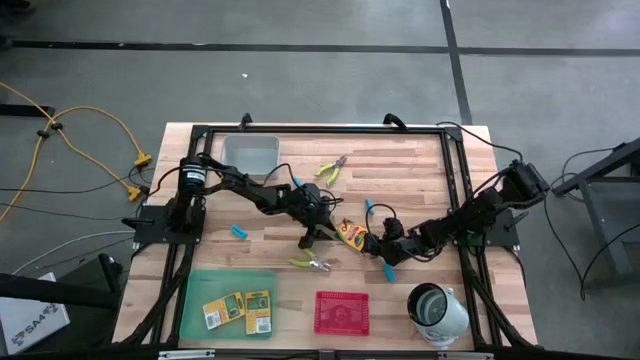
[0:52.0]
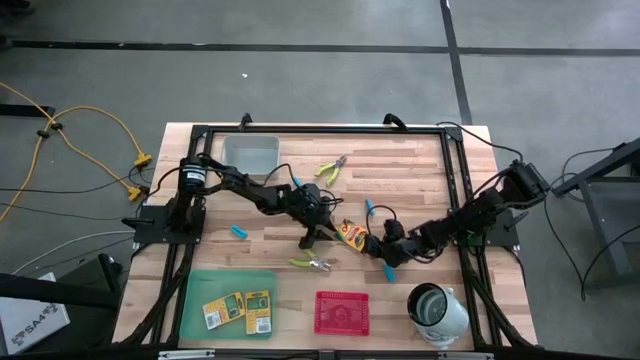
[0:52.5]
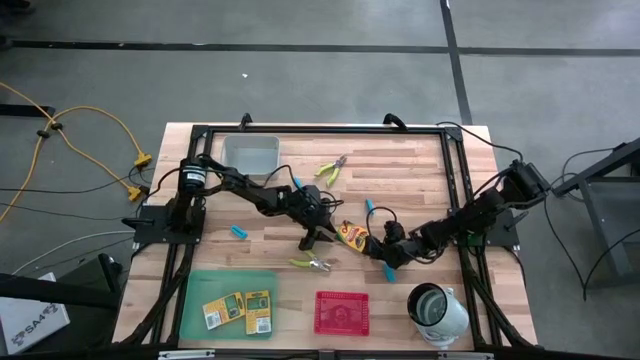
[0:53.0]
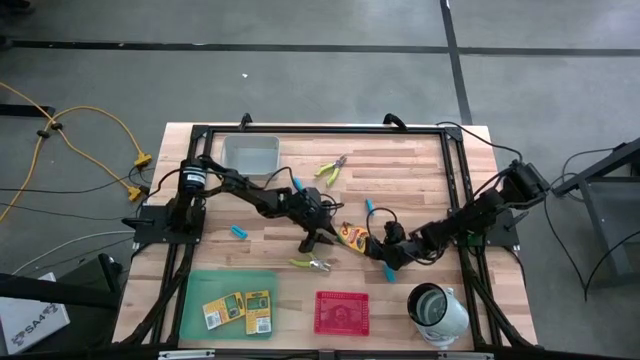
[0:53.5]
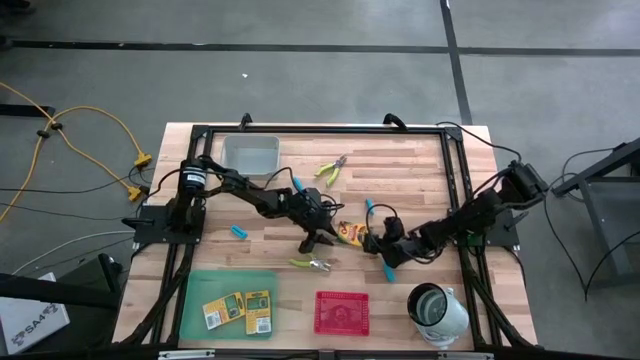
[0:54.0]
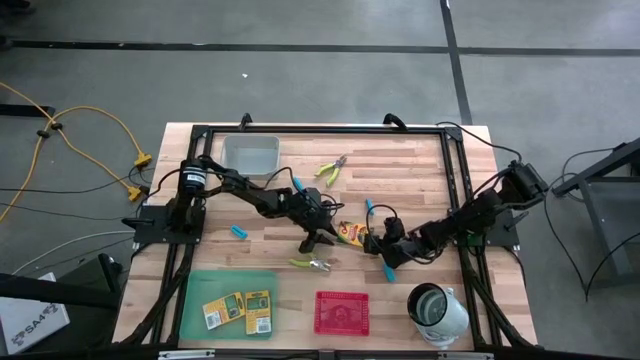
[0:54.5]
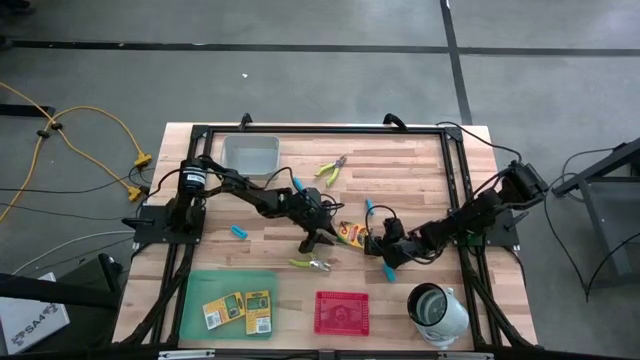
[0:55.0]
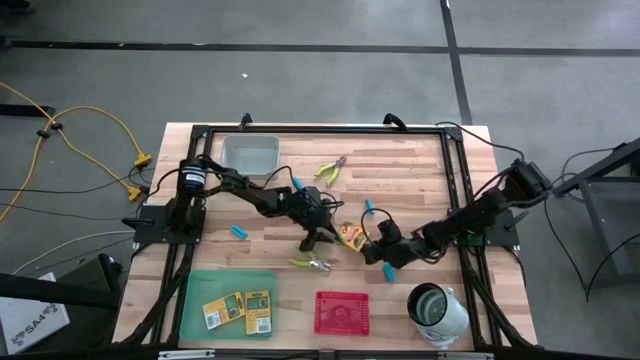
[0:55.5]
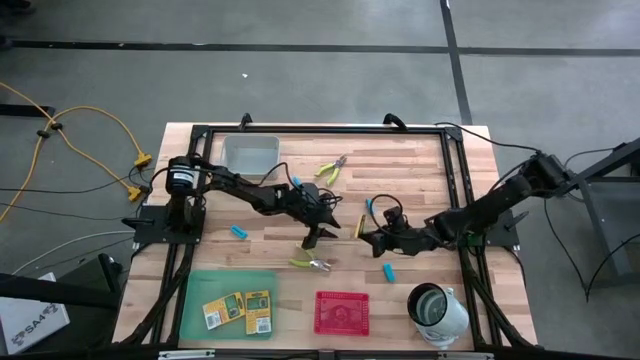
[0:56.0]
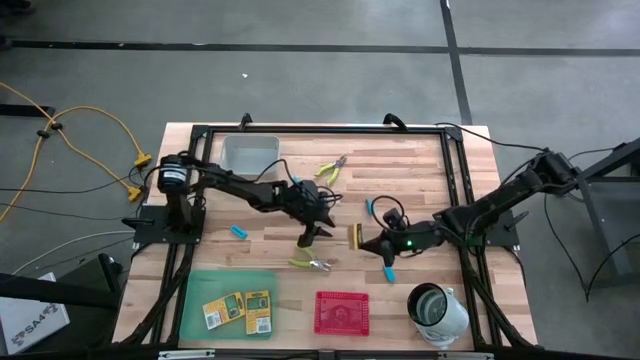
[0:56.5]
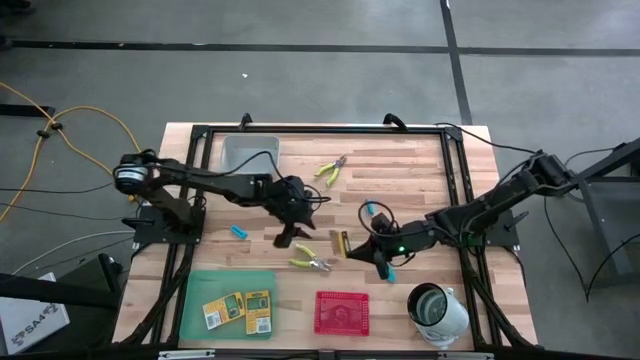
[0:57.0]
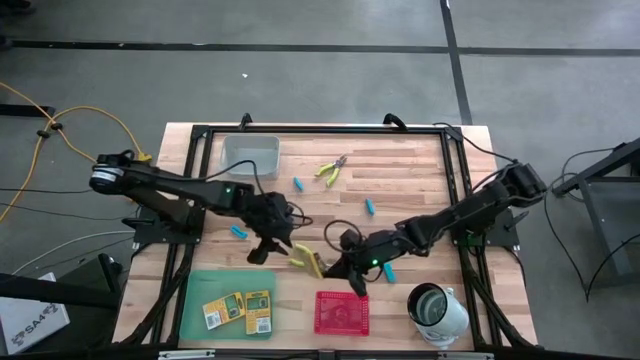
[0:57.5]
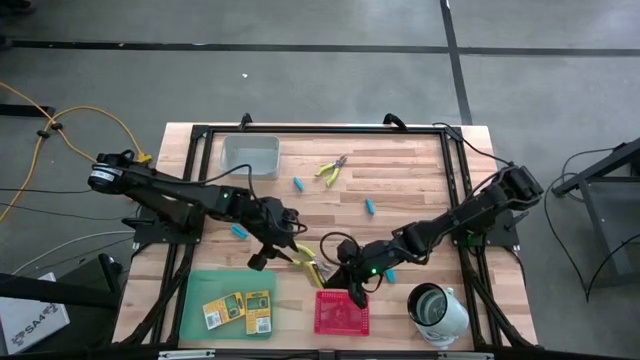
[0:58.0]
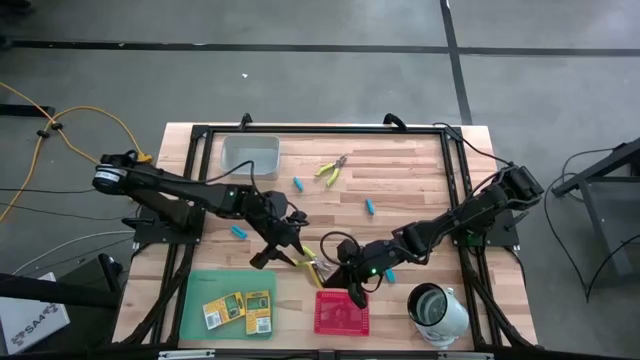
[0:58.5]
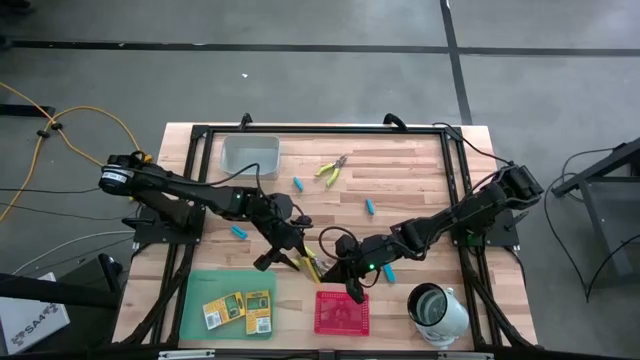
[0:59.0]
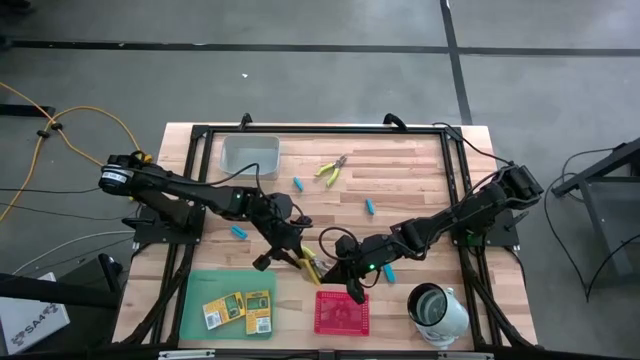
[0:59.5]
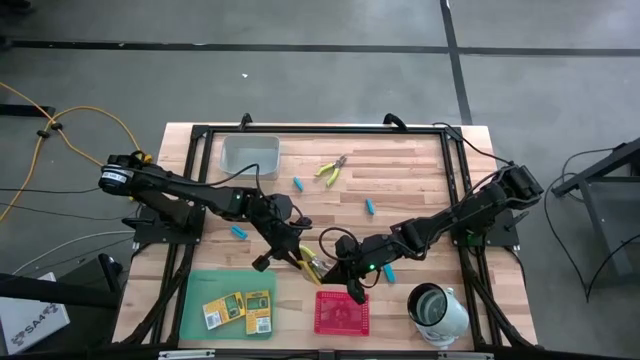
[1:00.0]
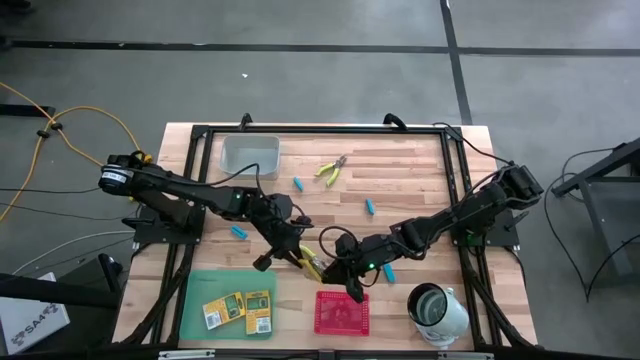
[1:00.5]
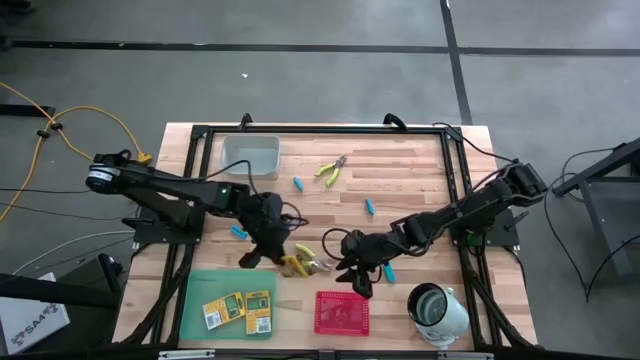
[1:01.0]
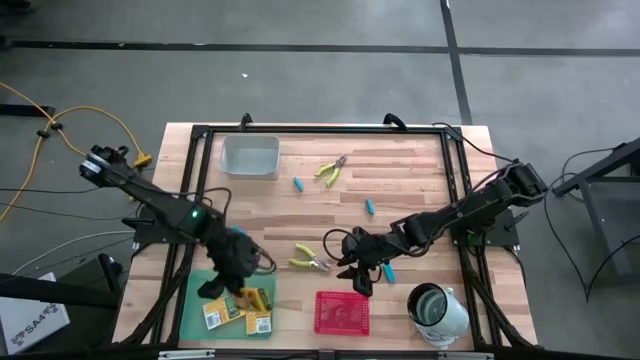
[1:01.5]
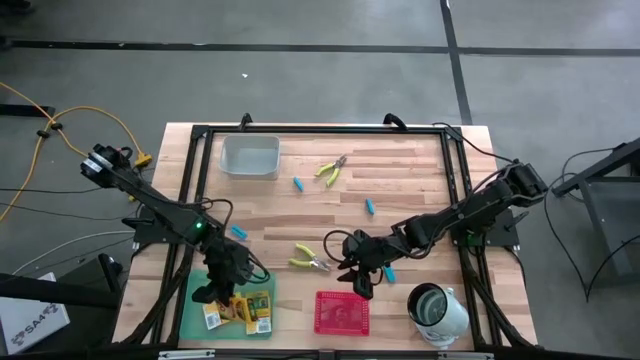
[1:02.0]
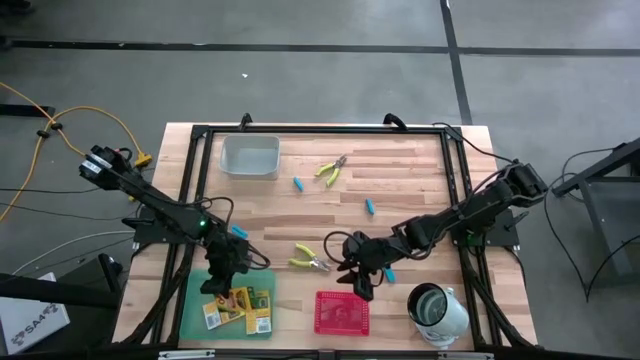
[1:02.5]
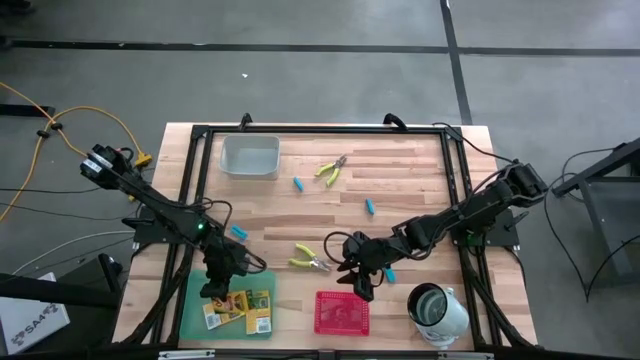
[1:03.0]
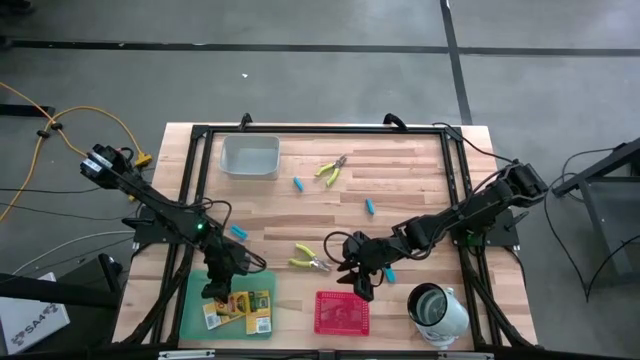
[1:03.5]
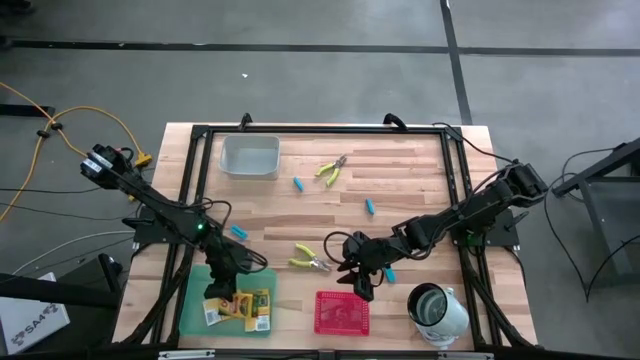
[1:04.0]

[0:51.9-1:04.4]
Task: Pick & Place School Supplies
Put the yellow crayon box into the green bin

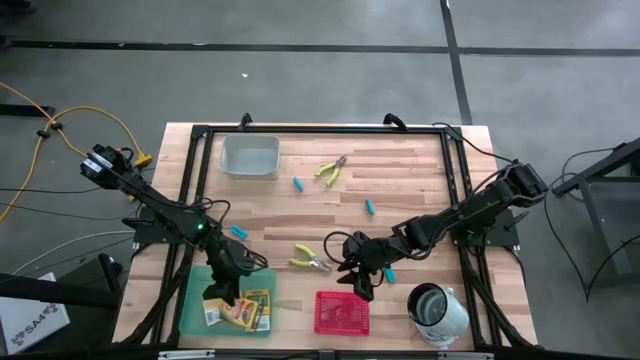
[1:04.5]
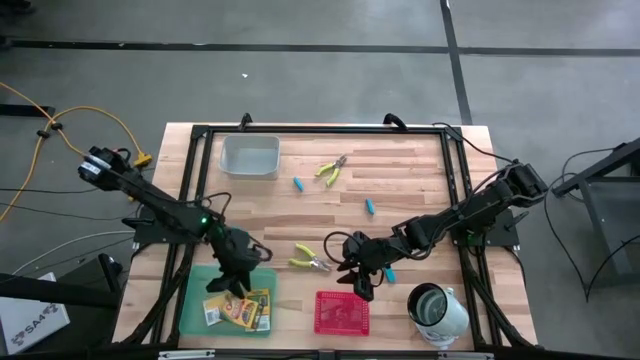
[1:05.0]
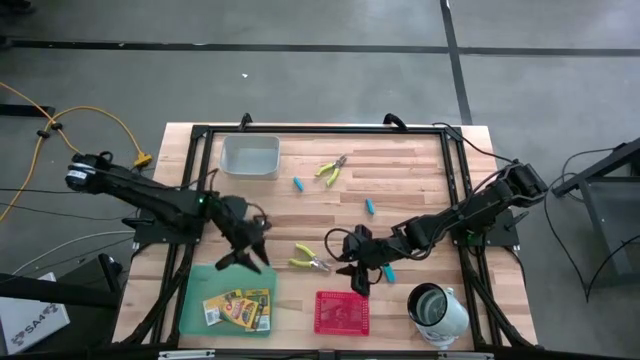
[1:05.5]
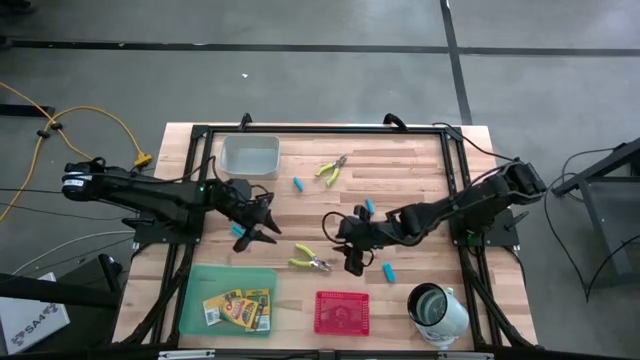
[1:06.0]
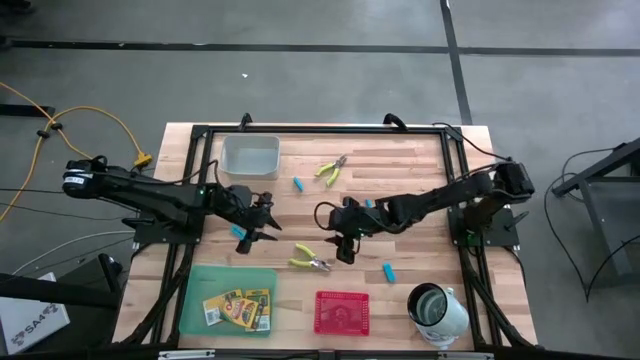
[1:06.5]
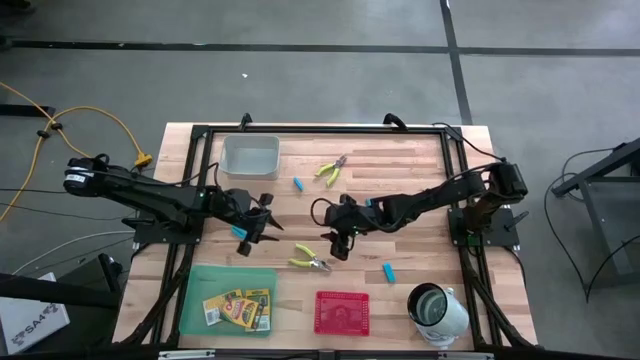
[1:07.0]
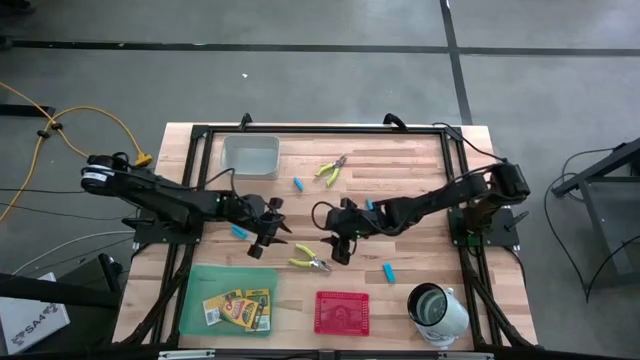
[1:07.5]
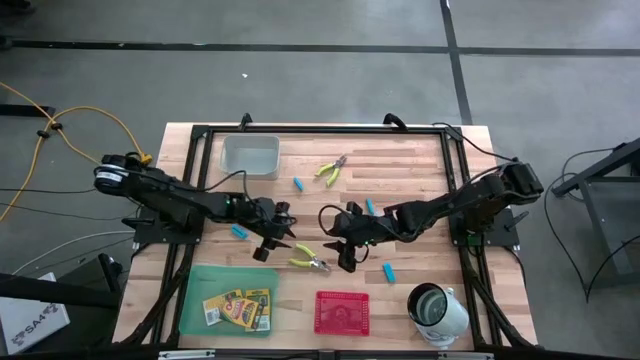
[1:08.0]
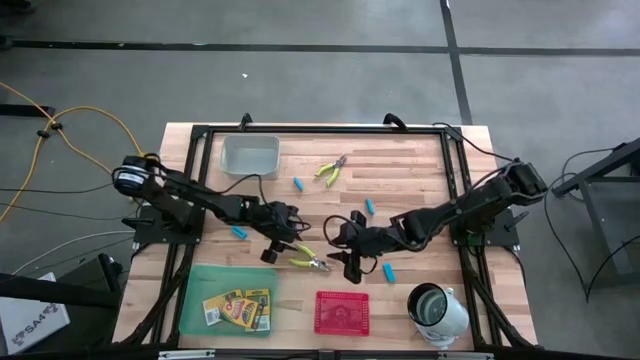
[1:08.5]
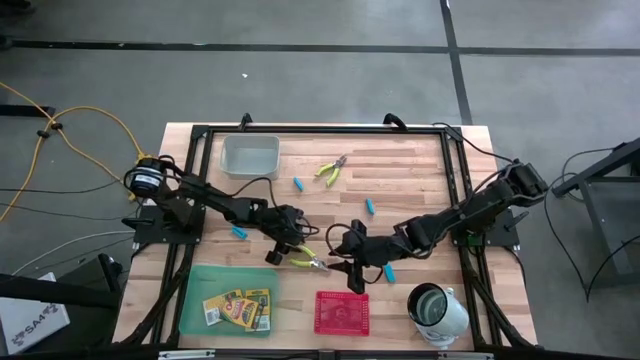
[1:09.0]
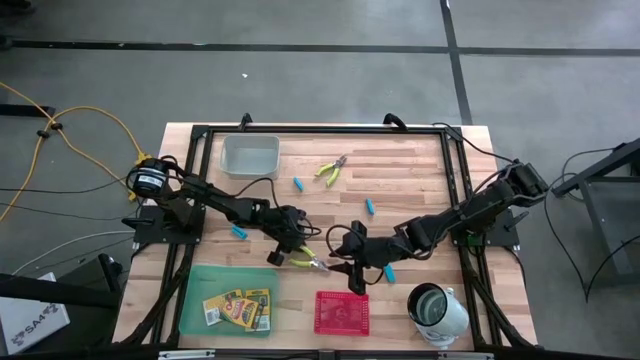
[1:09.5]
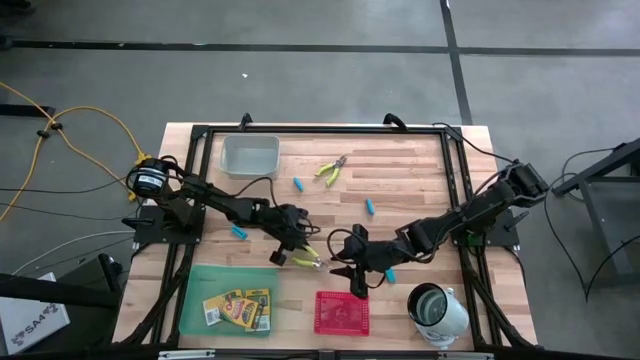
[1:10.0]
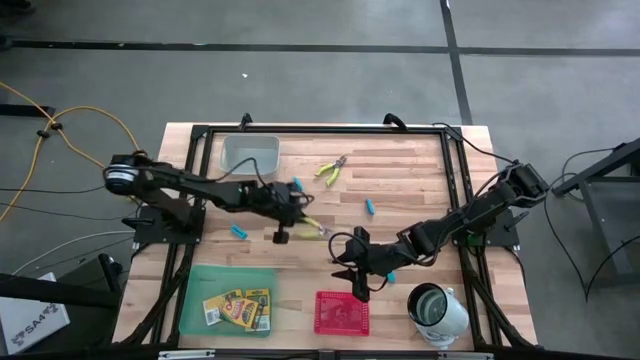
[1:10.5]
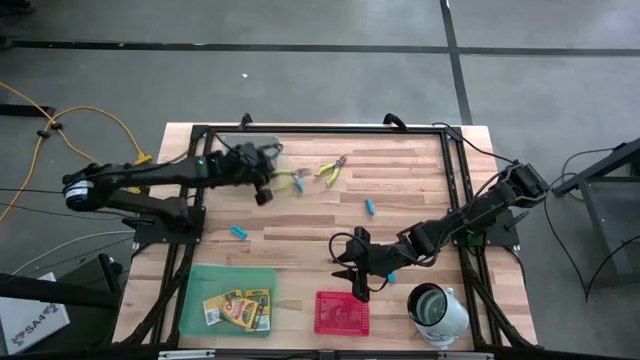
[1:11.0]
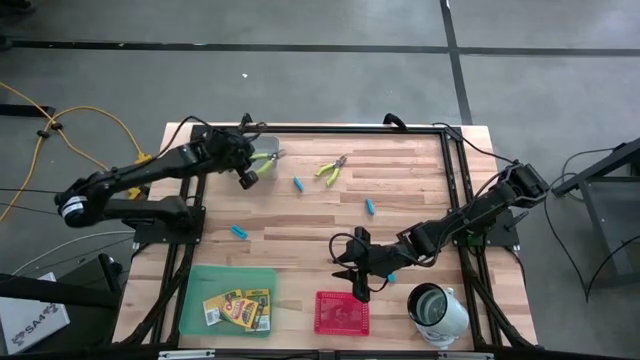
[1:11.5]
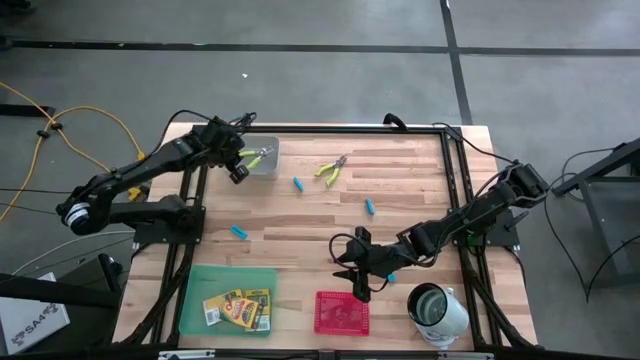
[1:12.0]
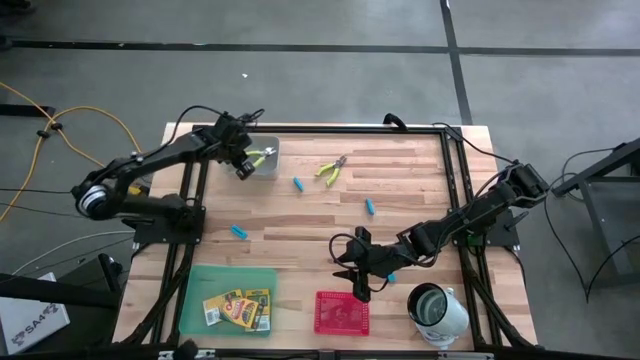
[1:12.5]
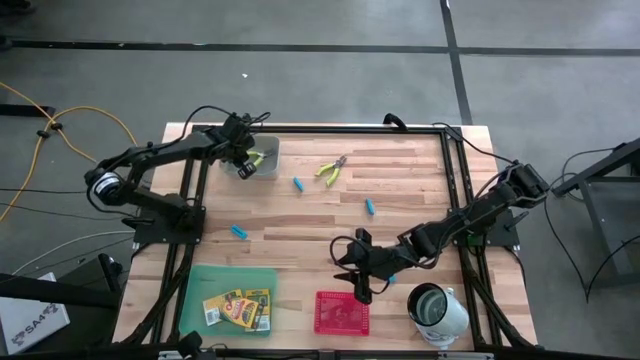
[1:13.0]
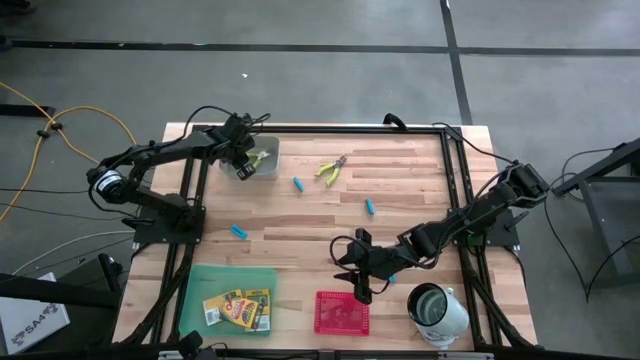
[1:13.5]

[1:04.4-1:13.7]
Put the green hole puncher into the gray bin
